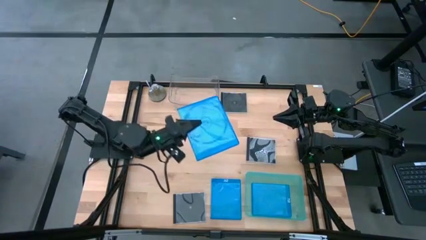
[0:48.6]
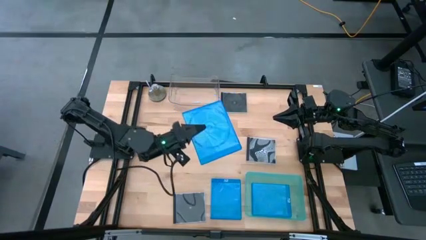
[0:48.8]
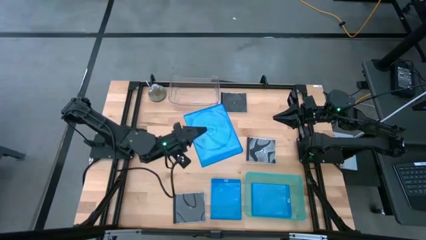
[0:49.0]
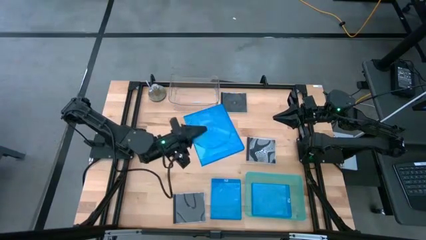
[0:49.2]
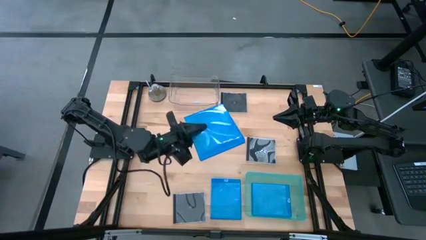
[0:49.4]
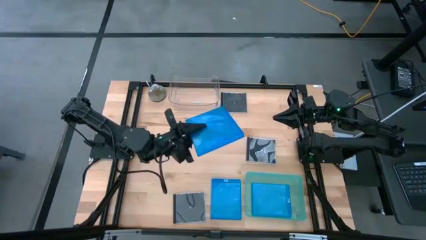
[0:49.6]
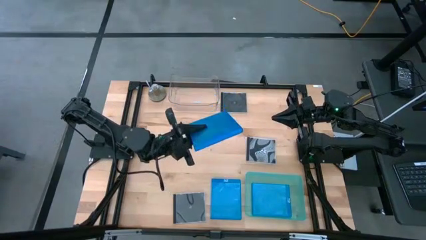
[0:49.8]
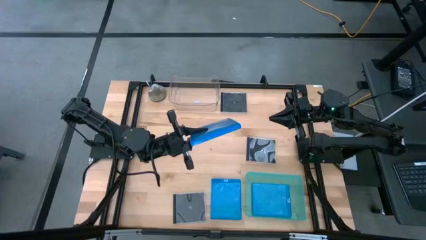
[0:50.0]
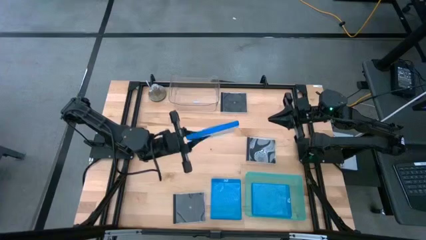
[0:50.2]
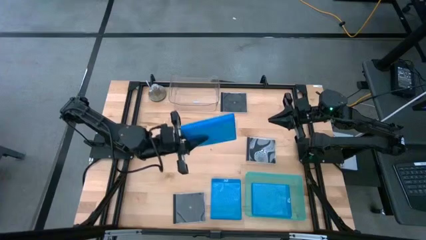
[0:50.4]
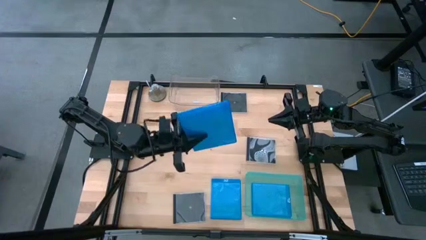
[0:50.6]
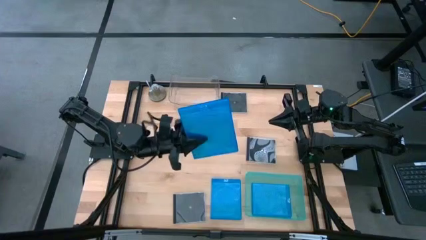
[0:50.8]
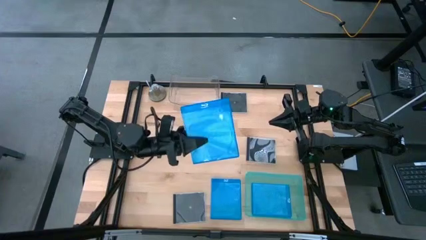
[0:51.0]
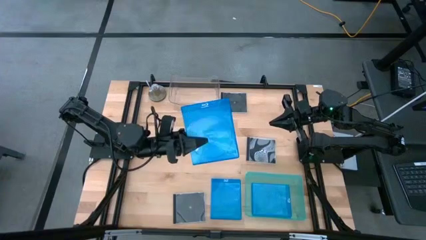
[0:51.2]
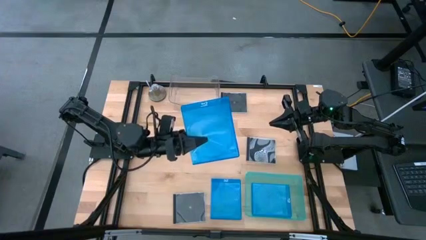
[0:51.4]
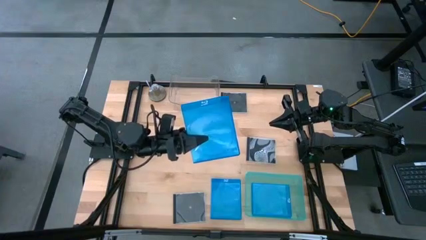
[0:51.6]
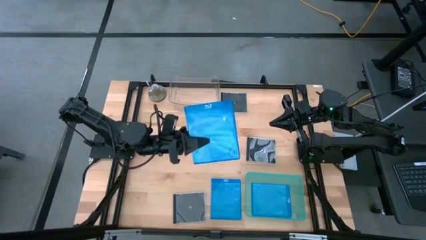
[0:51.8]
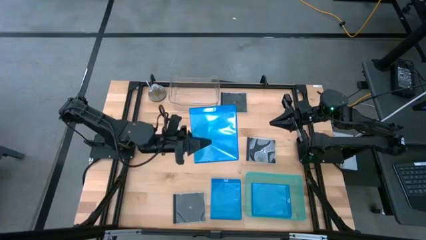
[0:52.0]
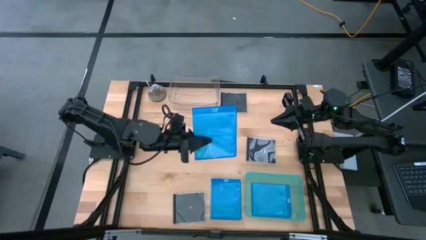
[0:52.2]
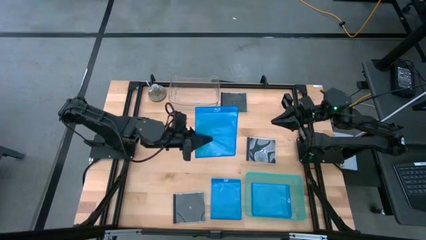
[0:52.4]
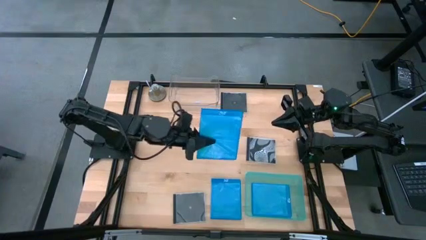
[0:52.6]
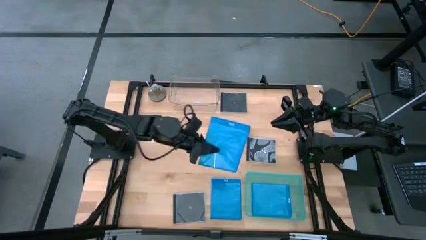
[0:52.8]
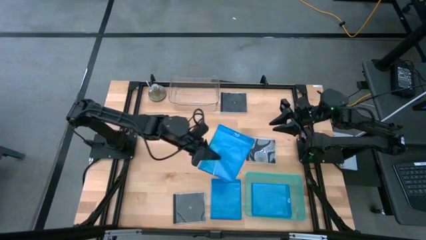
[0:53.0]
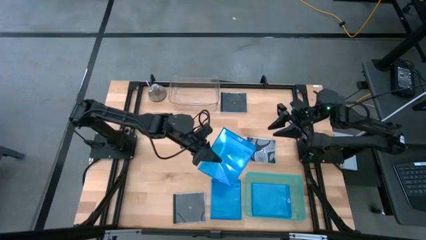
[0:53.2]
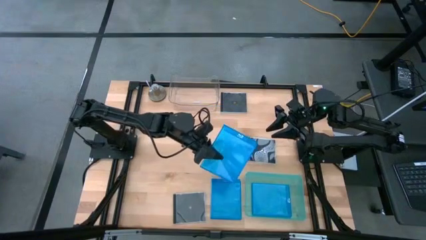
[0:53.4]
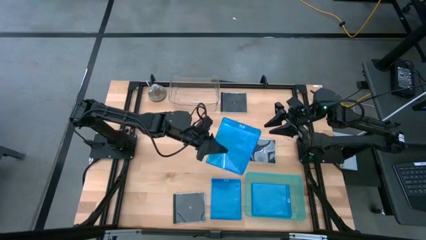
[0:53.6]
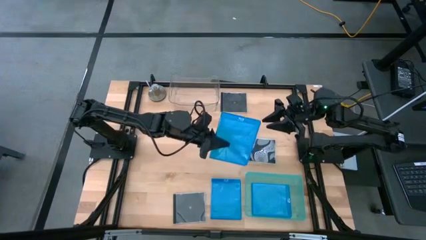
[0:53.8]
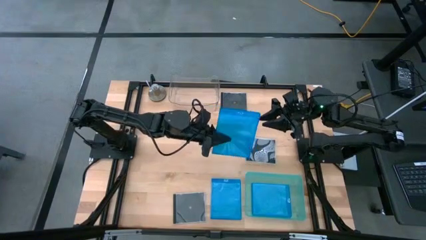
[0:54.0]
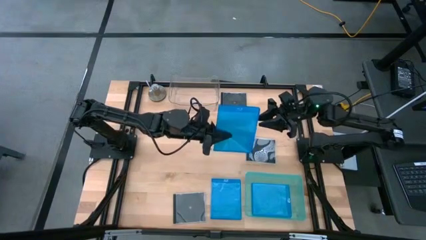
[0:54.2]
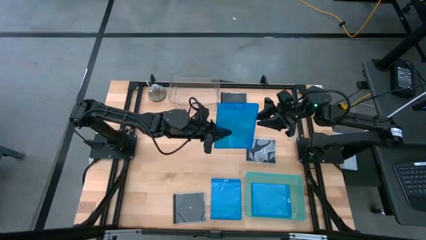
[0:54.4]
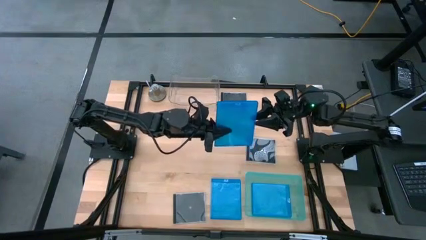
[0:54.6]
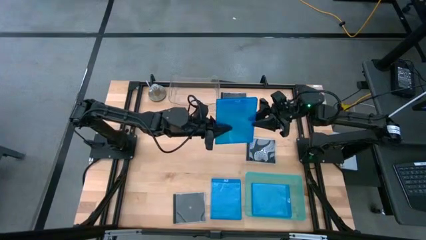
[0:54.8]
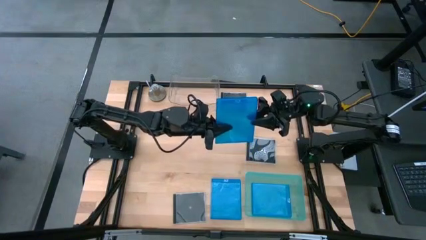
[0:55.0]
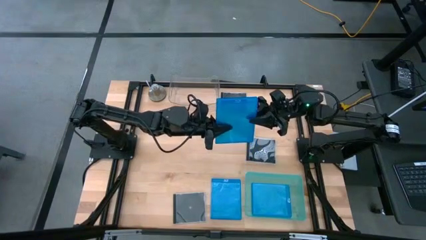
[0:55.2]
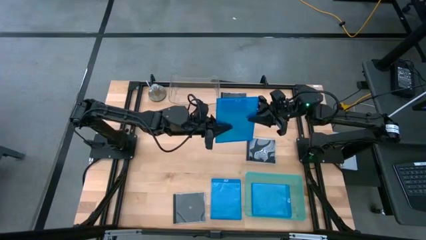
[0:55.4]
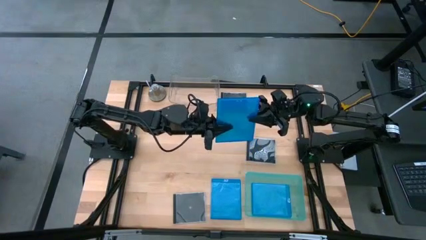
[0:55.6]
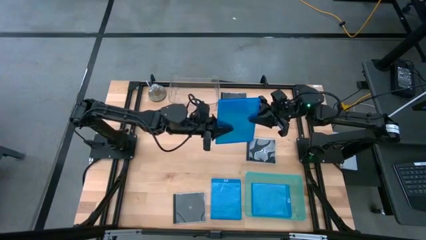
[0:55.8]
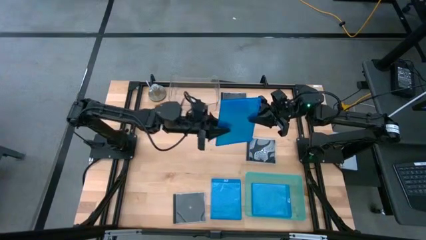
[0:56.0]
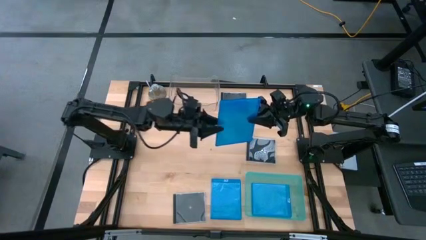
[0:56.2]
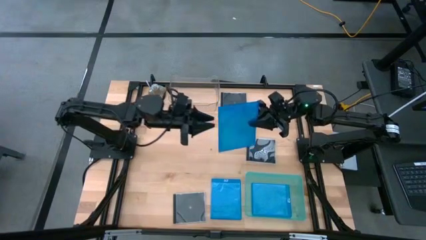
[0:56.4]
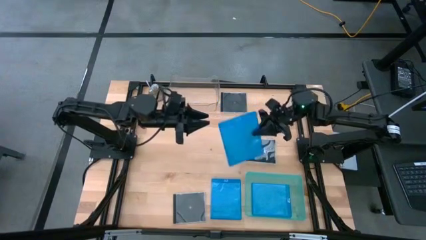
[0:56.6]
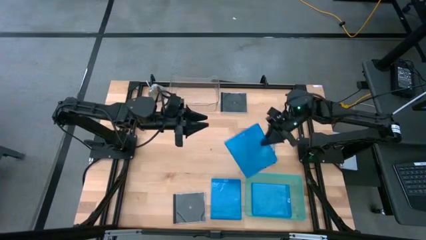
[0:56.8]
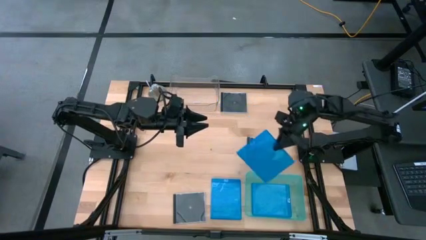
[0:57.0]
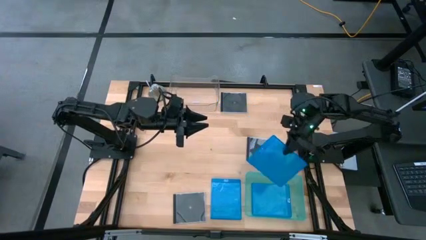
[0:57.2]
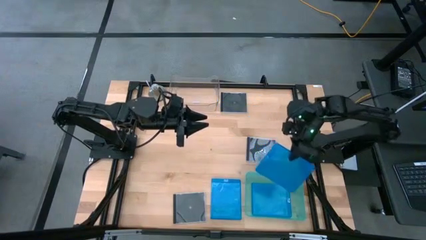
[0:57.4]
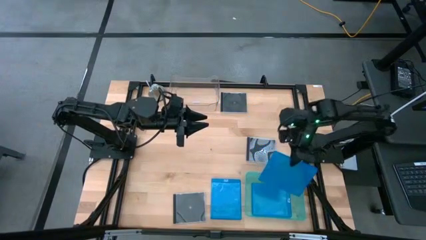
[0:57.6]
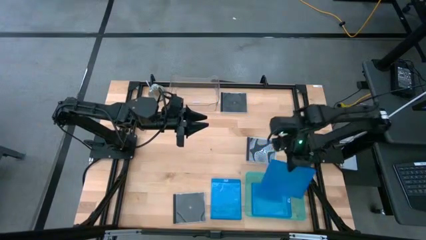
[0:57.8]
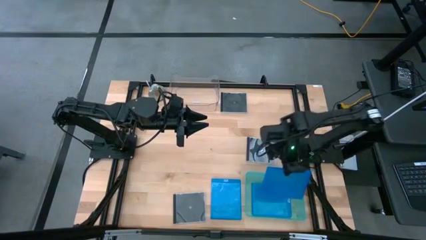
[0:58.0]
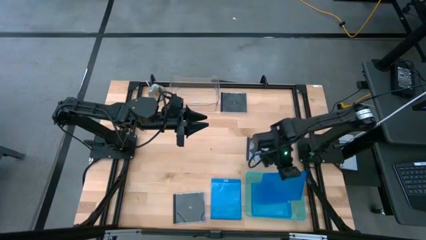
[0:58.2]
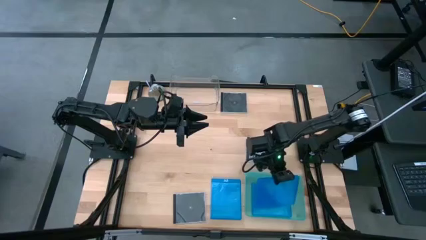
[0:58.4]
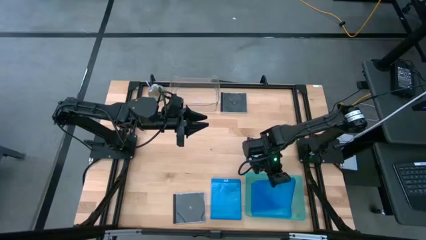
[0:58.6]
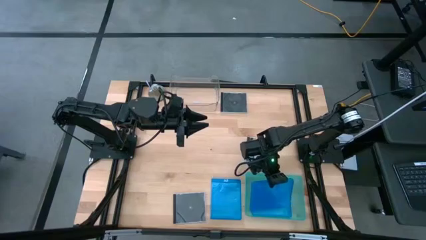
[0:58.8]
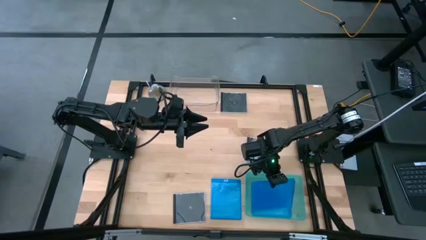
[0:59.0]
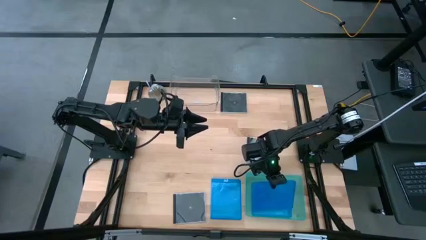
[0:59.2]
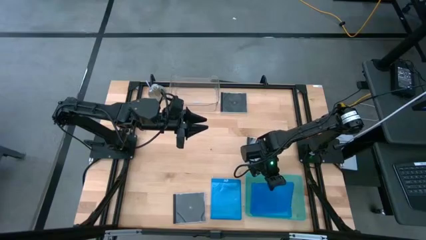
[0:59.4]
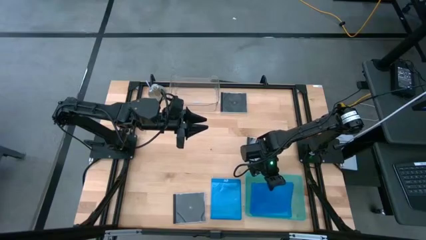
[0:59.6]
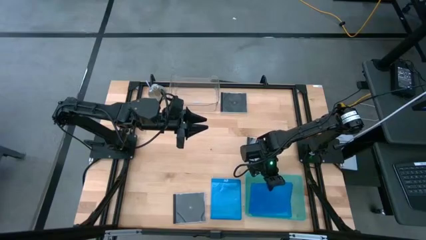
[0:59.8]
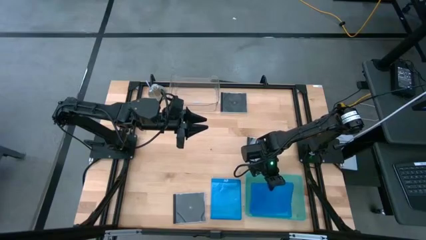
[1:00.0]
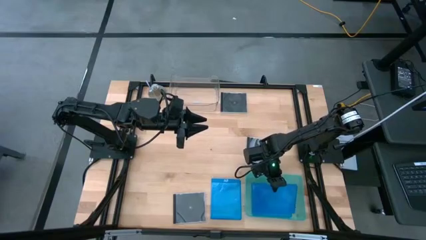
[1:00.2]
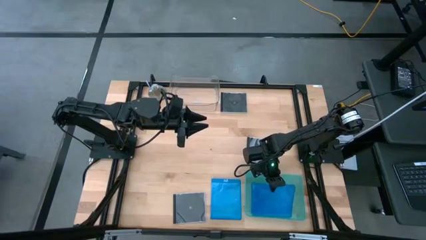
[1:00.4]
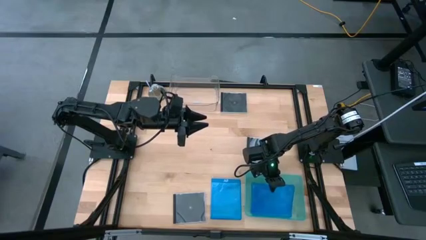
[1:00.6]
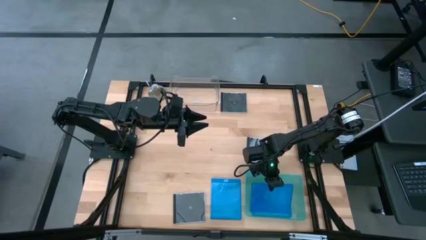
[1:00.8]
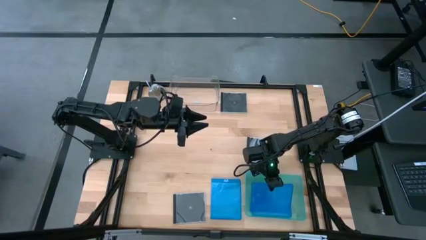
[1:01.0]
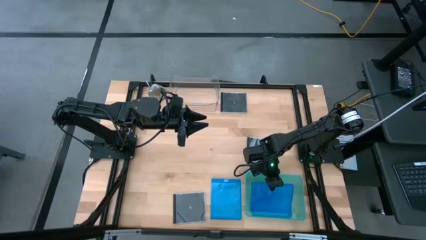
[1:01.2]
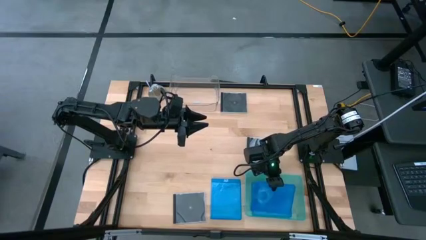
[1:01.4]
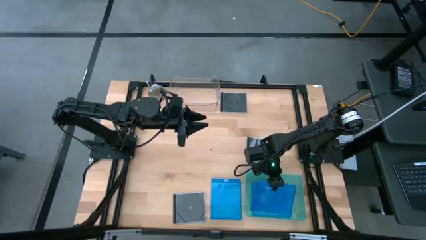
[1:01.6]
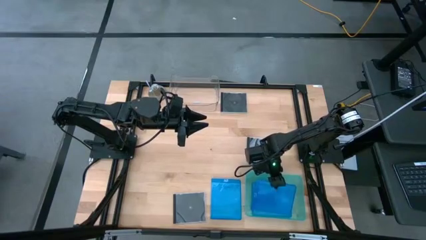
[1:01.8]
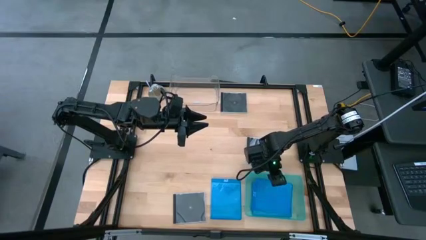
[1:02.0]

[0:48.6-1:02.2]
Task: Pick & place jewel cases by type
Put the top blue cd case into the green bin
